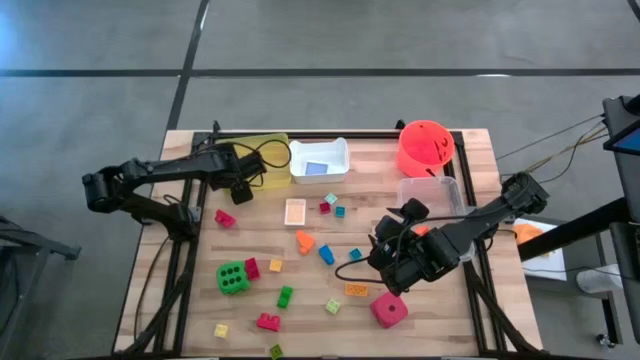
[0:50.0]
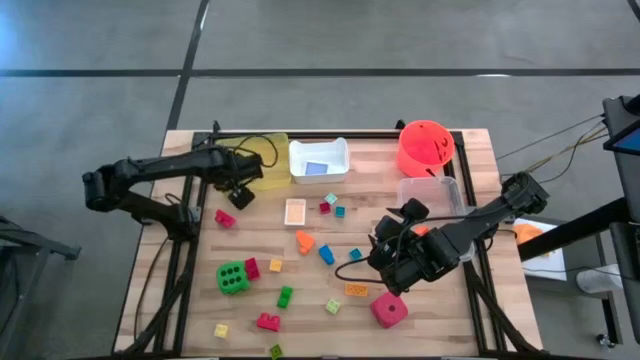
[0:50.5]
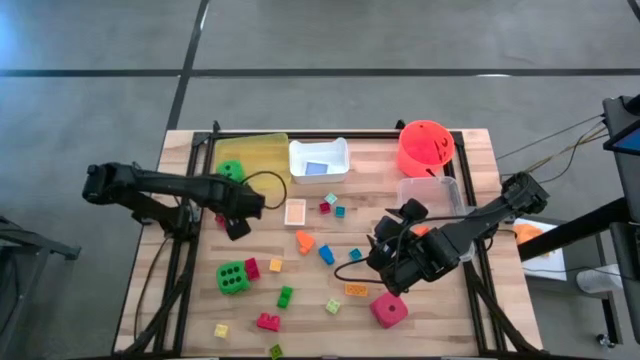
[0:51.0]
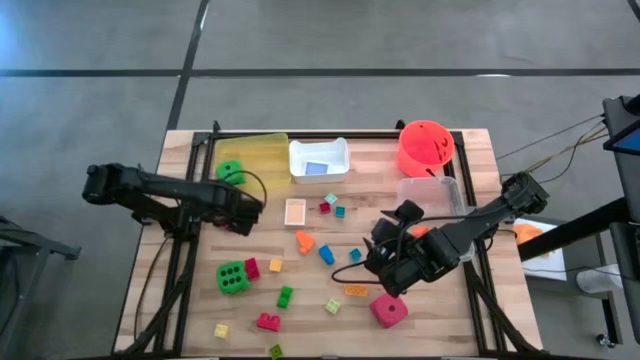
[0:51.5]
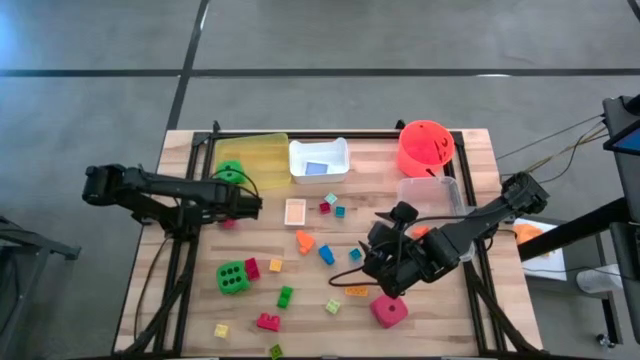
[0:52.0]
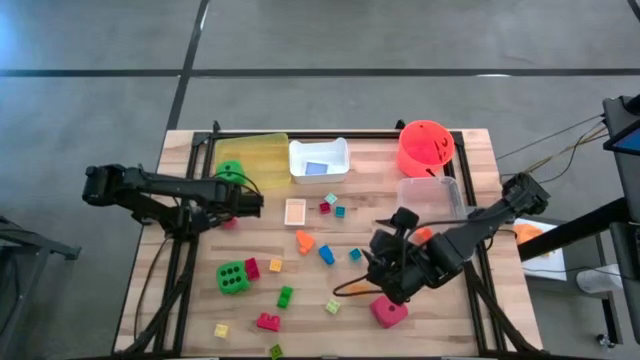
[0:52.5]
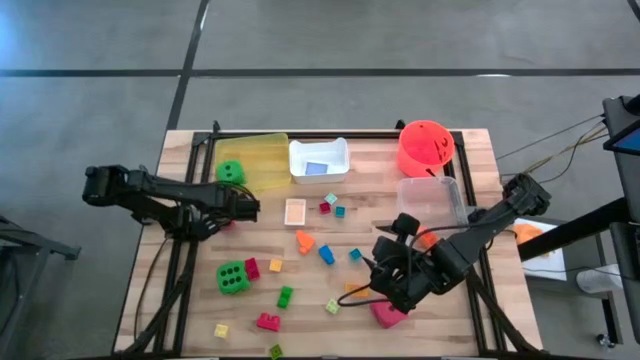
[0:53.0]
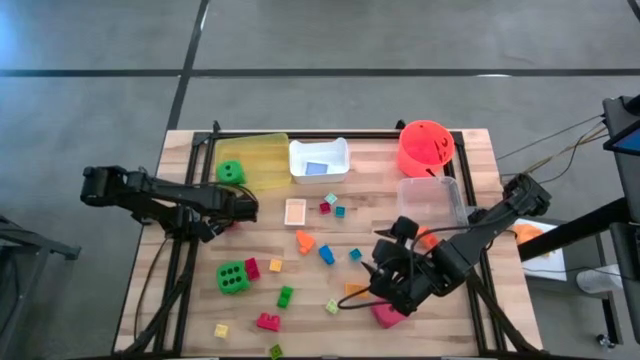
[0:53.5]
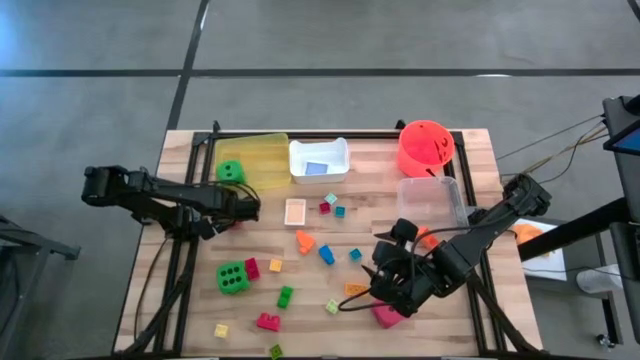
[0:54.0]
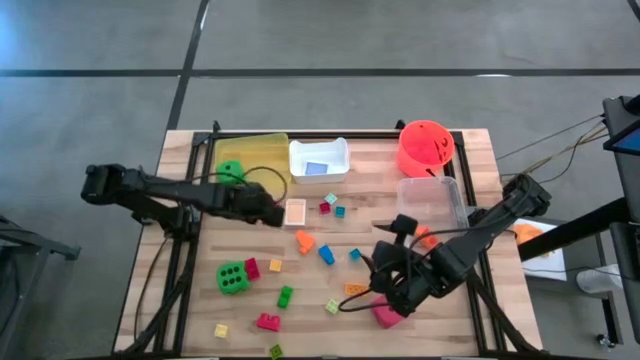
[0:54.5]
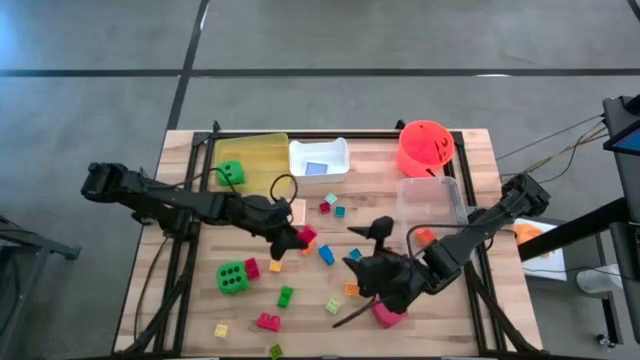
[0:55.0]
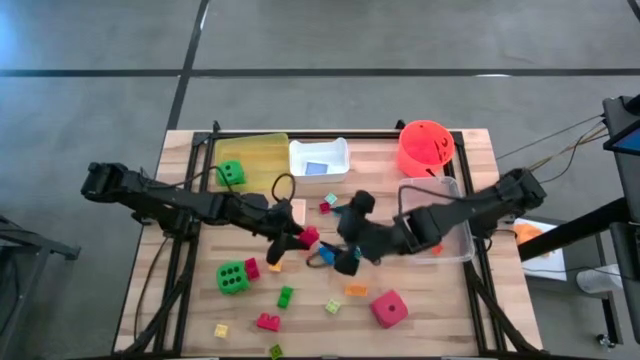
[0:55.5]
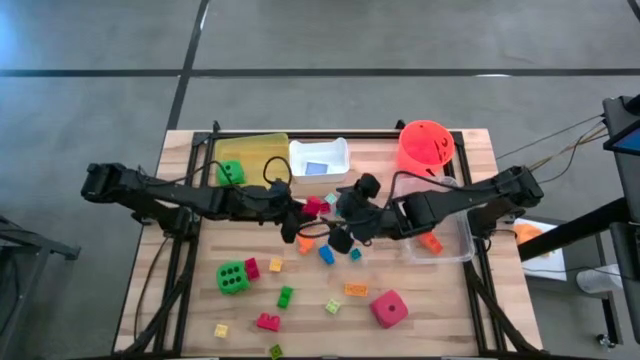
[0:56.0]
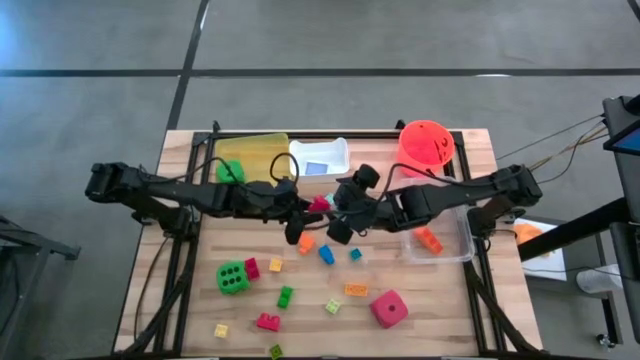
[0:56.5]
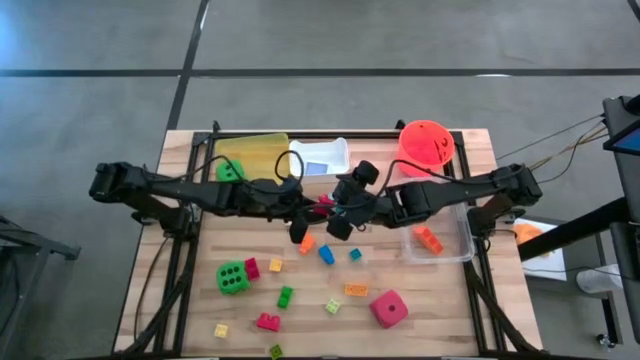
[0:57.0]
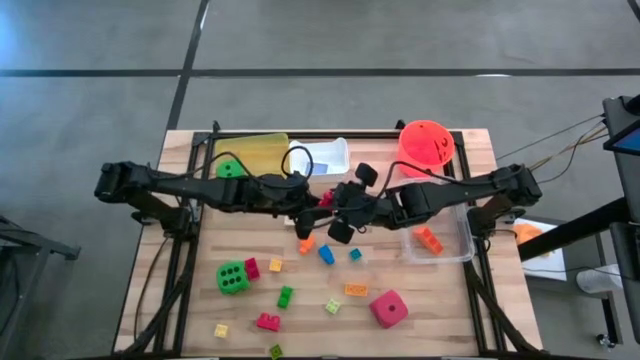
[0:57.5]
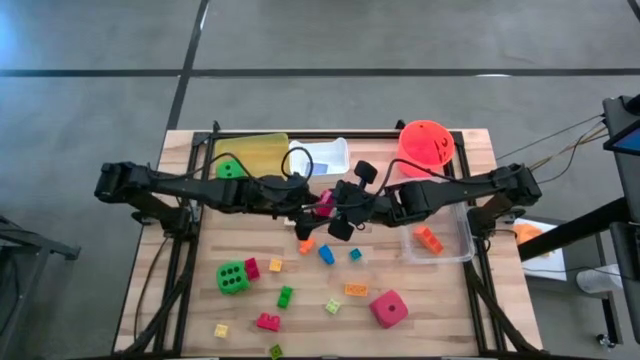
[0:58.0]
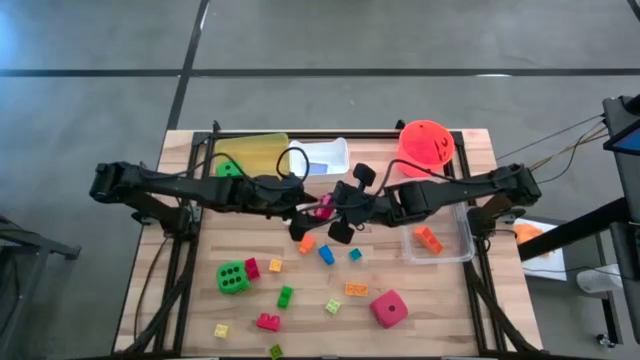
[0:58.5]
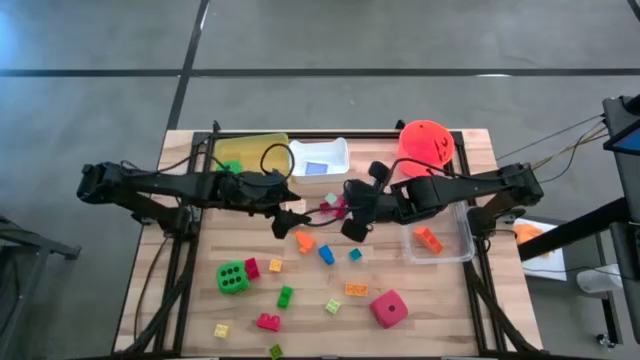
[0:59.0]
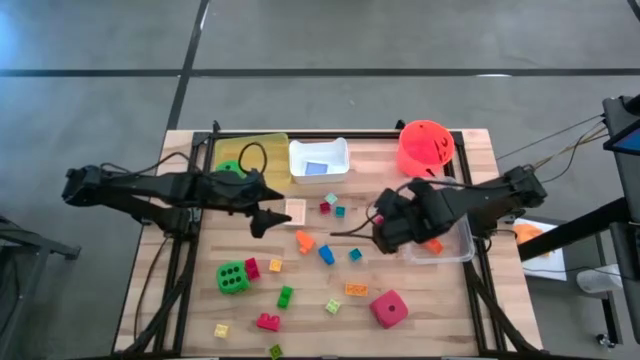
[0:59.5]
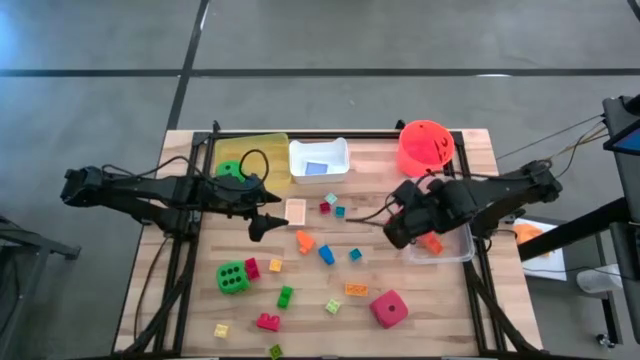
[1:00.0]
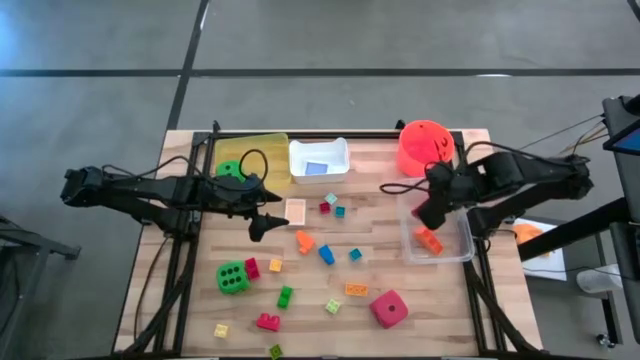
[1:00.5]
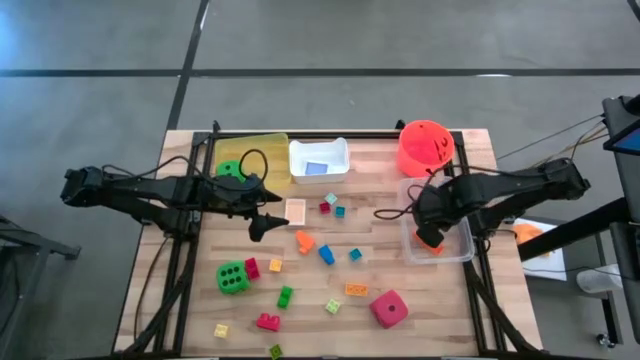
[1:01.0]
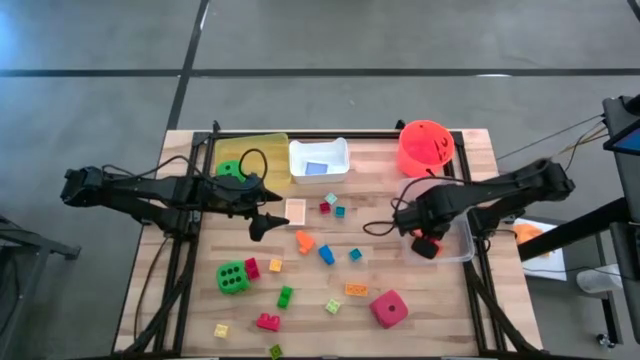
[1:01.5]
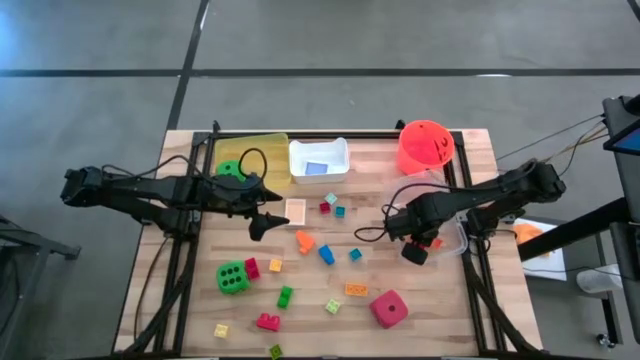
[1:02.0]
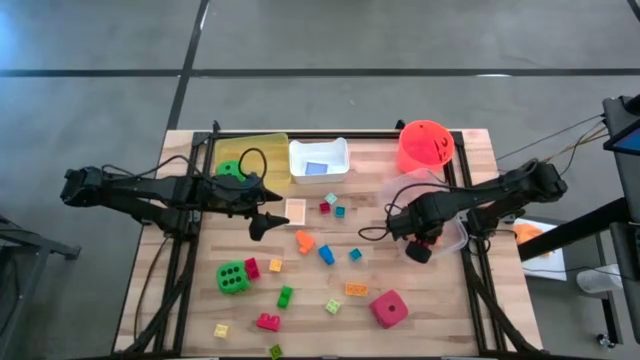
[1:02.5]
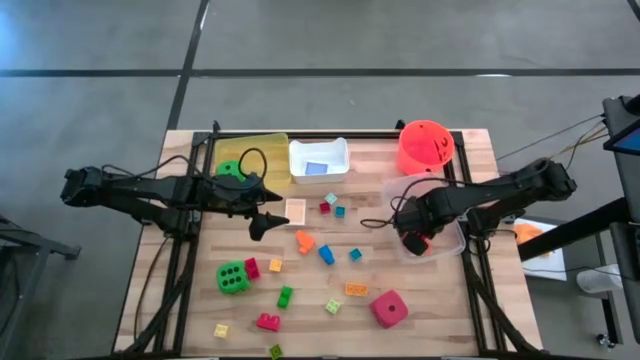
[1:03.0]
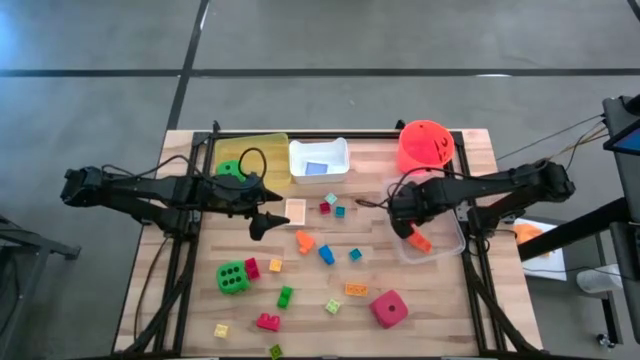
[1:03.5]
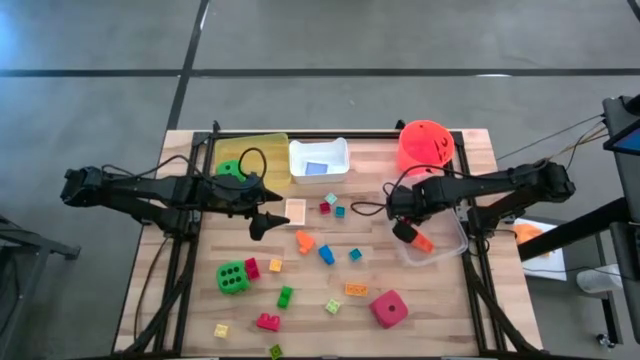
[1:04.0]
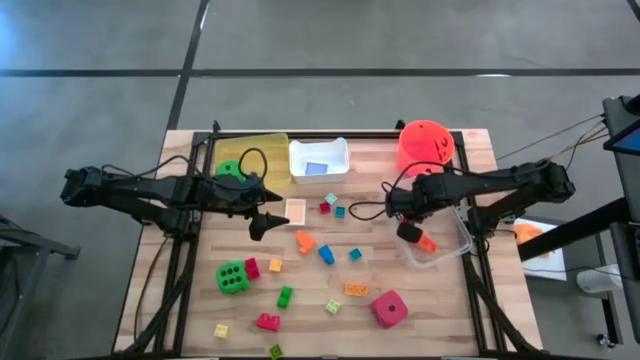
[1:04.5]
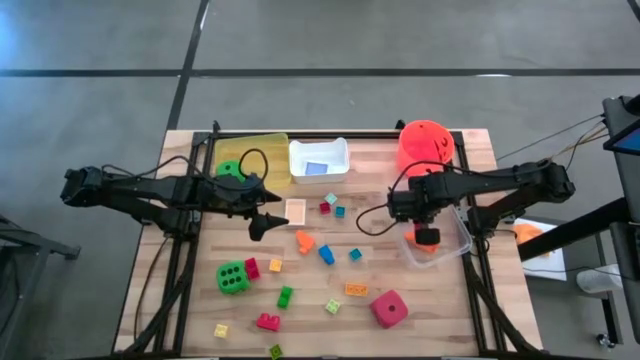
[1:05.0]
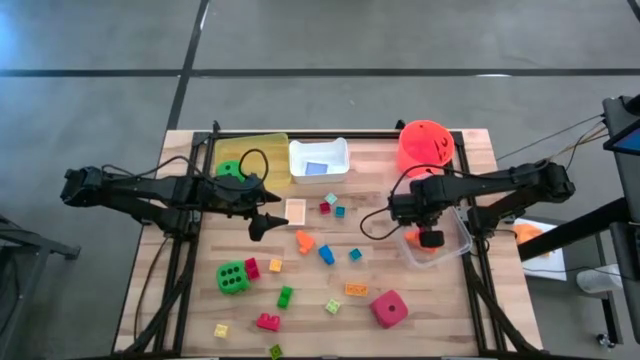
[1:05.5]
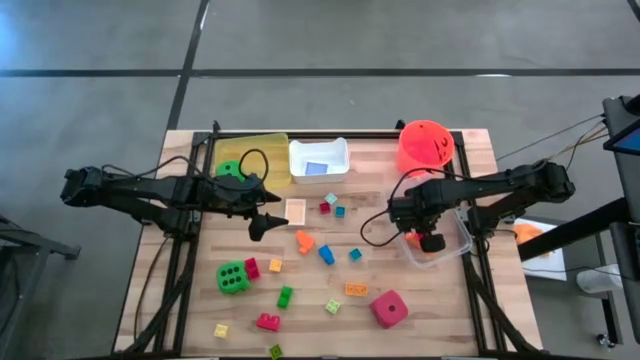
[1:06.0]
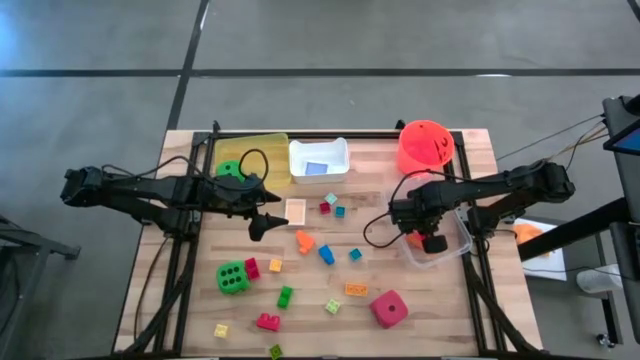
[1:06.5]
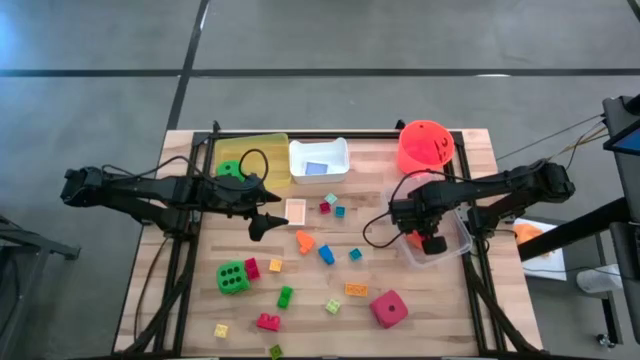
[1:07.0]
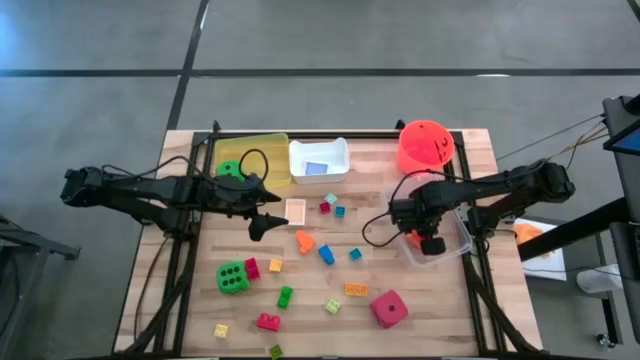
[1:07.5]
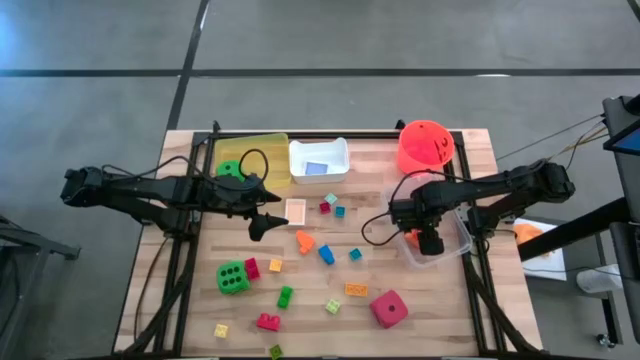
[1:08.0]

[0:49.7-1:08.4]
Task: Pick & Place Toys
Put the red game piece into the transparent bin
